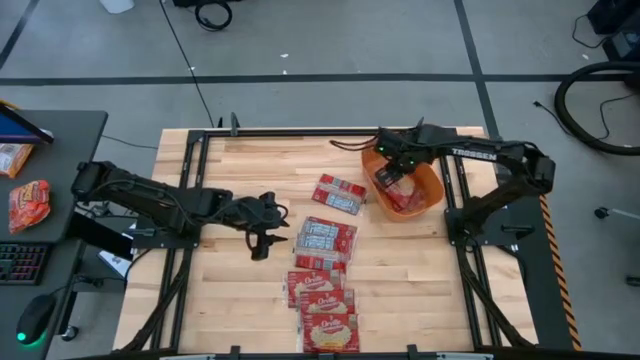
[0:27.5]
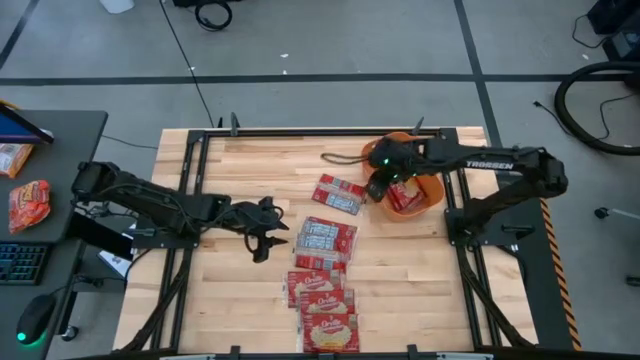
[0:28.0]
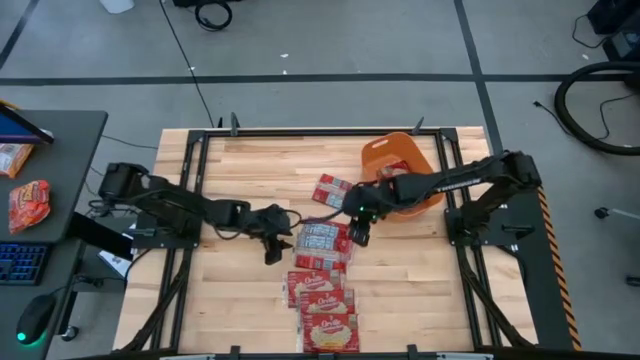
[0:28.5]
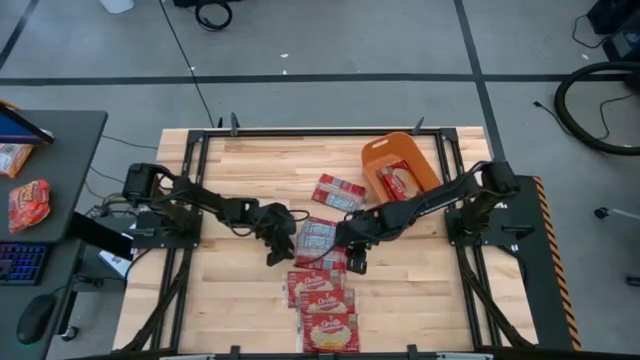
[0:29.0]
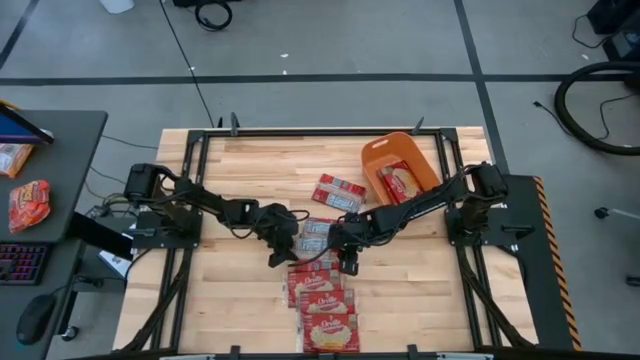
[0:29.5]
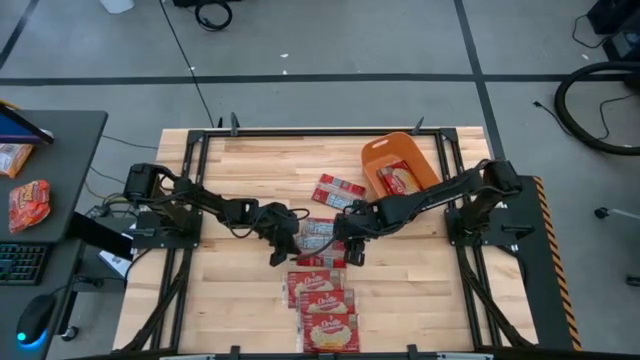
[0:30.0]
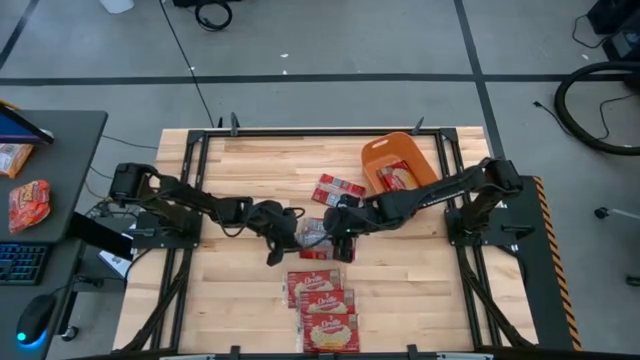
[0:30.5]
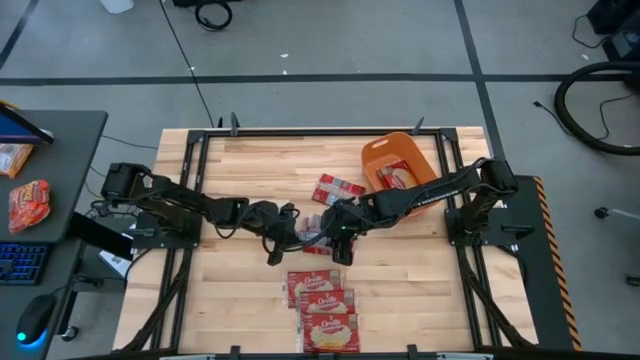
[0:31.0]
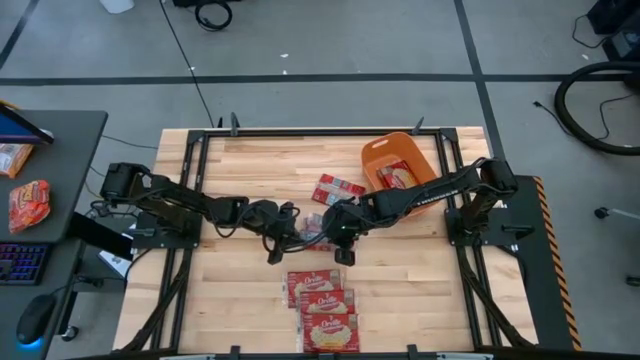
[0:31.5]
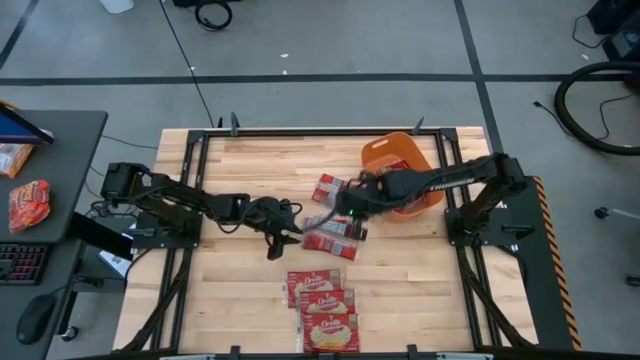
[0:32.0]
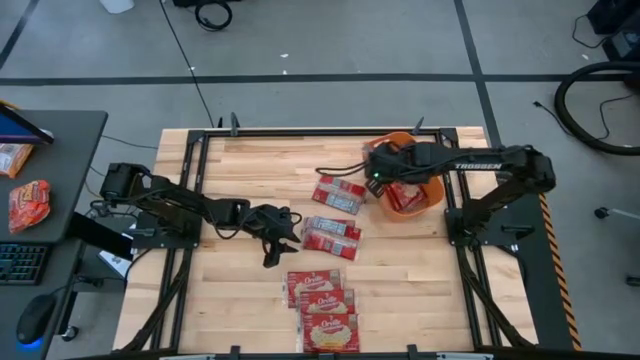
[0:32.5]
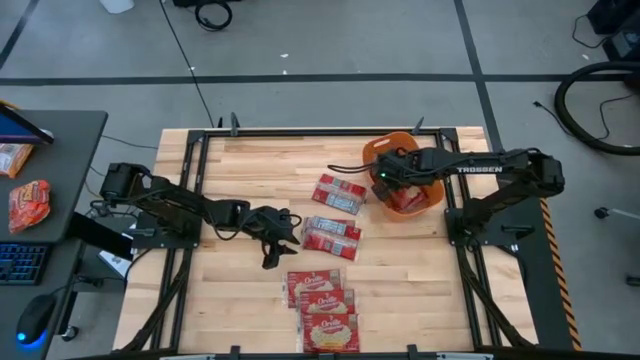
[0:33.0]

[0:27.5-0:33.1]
Task: Sort popcorn bags into baskets
Put the red popcorn bag into the orange bin

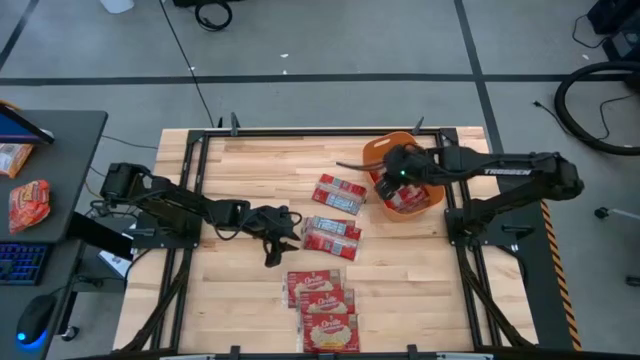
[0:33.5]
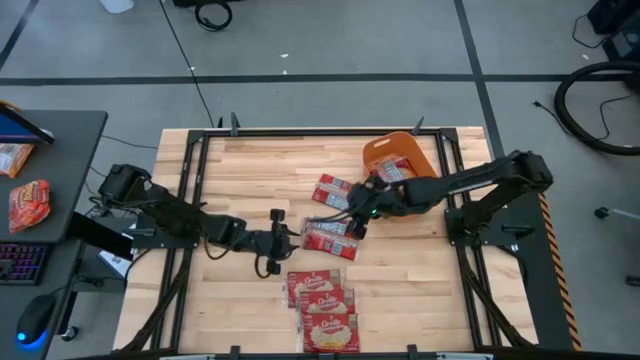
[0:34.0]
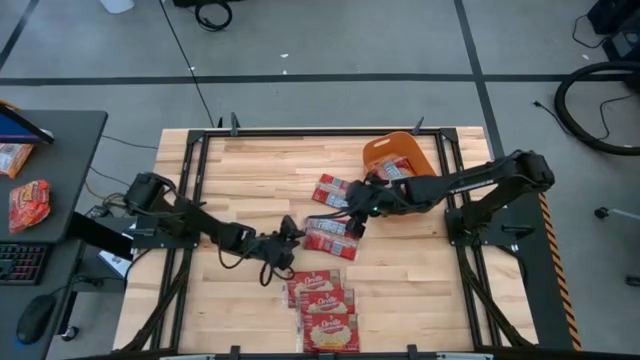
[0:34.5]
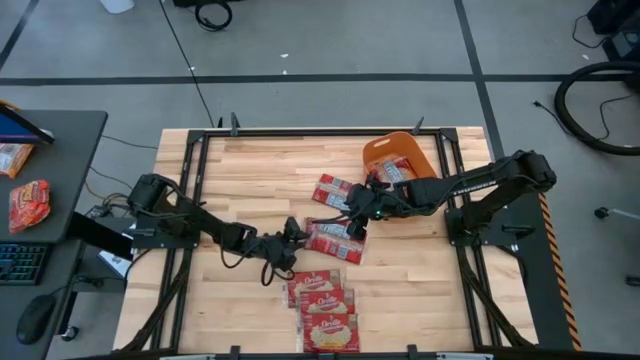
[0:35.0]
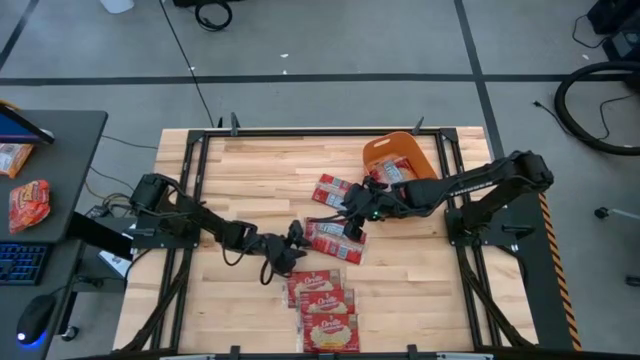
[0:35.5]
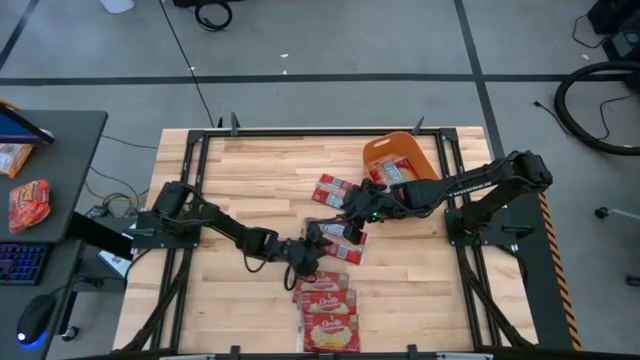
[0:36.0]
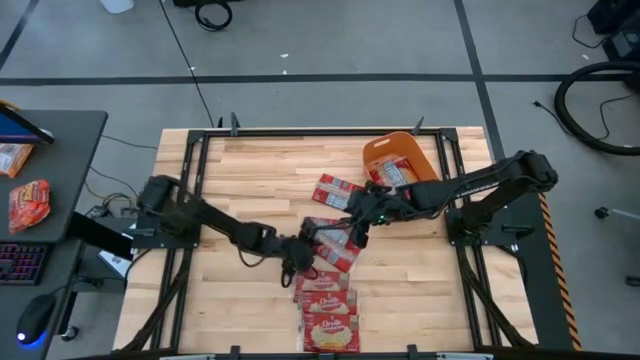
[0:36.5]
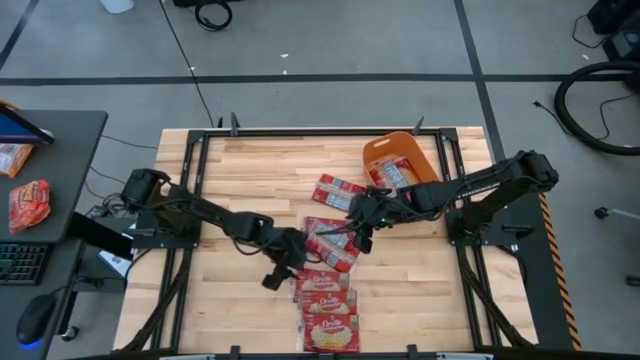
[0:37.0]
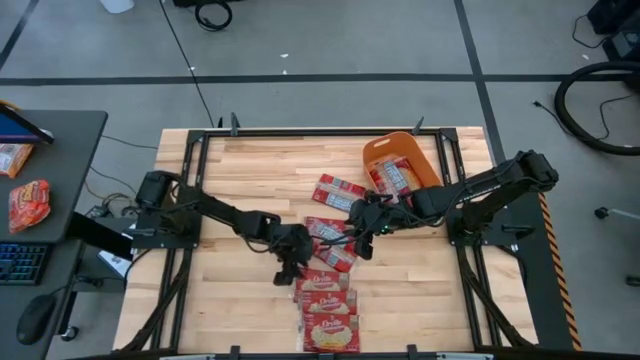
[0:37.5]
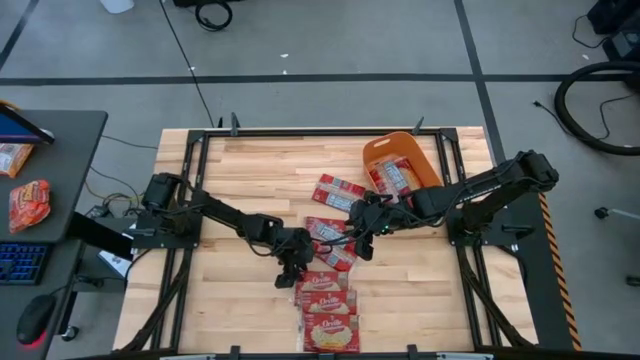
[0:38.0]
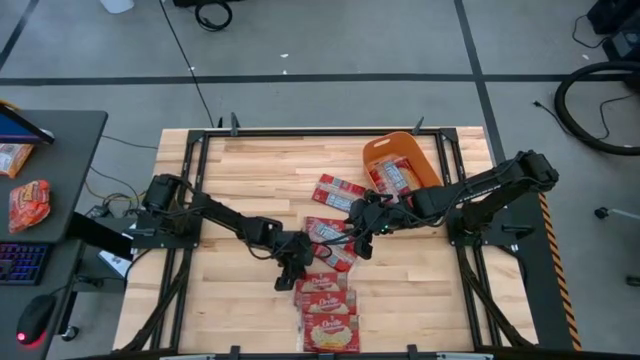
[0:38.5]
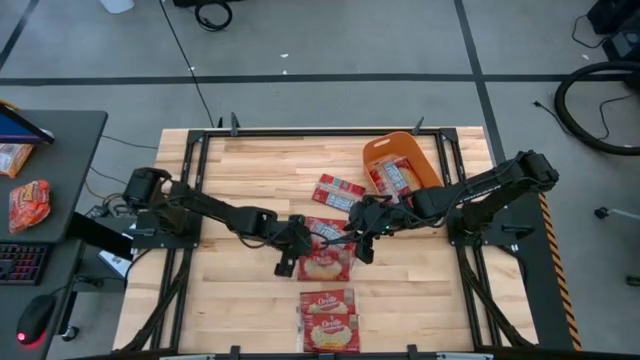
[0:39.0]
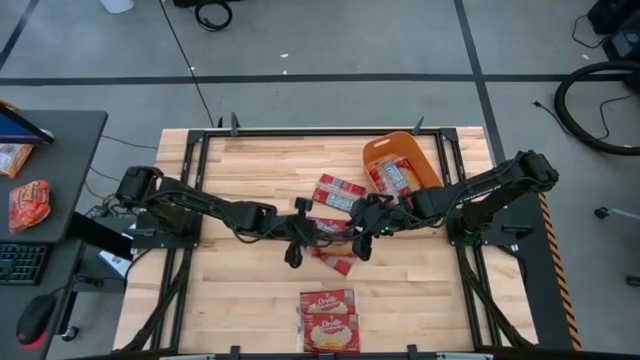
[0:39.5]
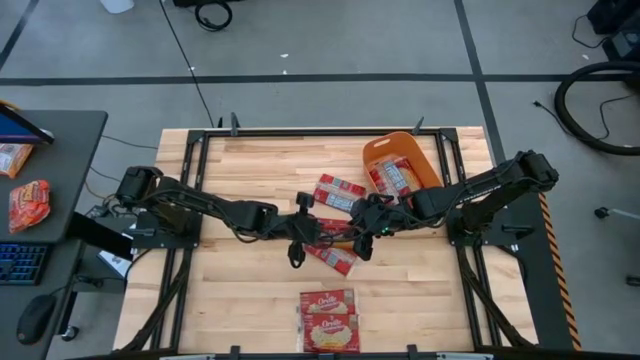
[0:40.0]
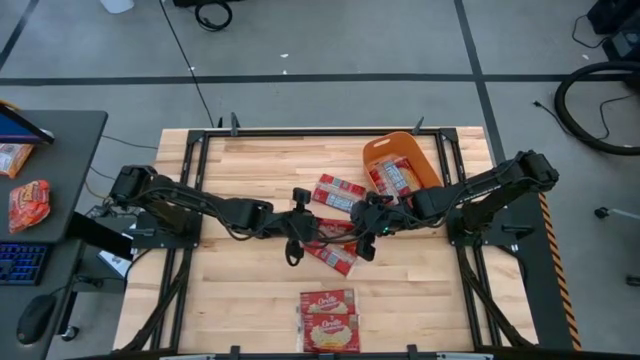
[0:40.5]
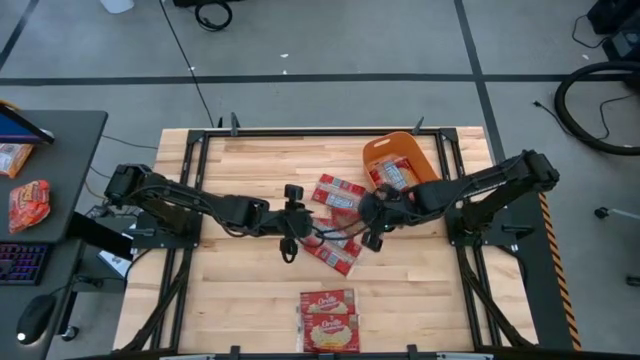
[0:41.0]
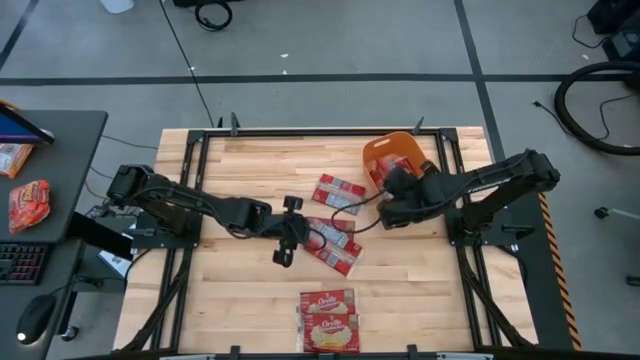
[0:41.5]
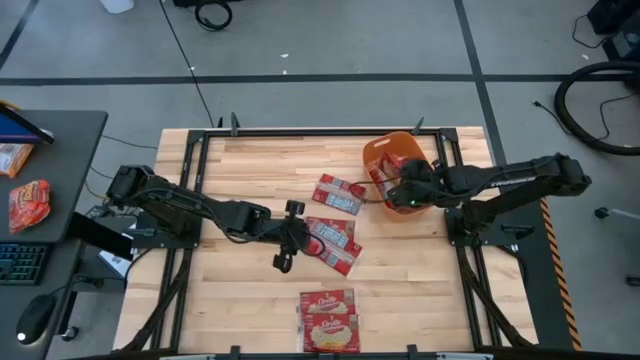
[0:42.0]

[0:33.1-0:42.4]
Put the red popcorn bag into the orange bin

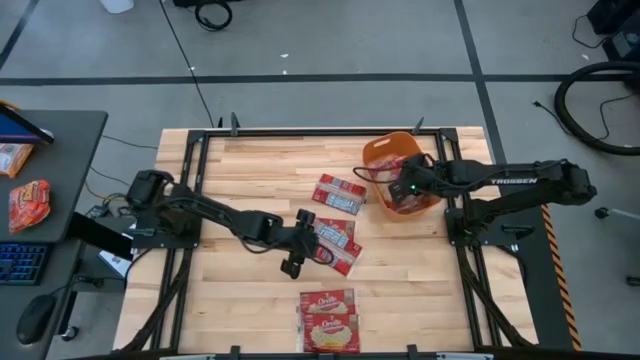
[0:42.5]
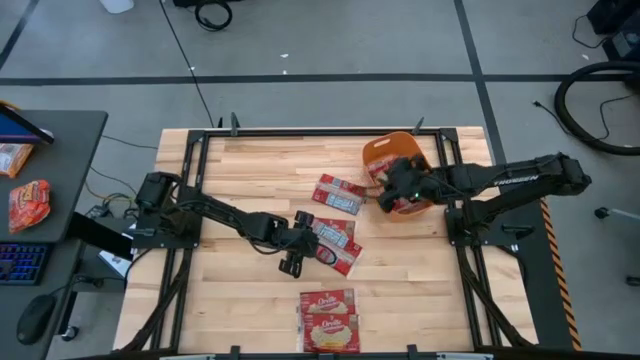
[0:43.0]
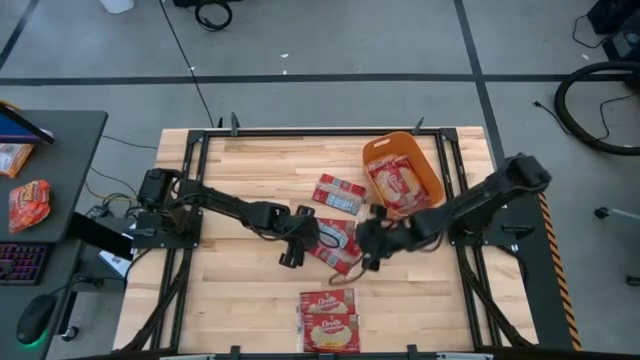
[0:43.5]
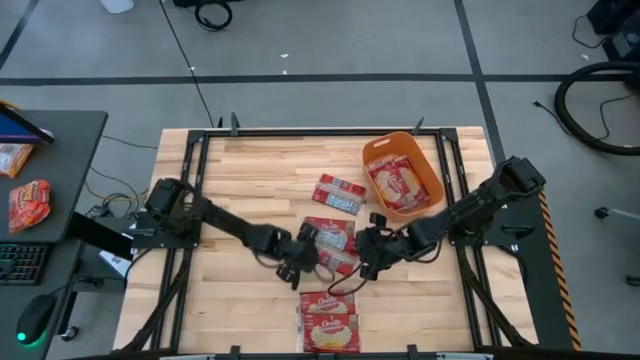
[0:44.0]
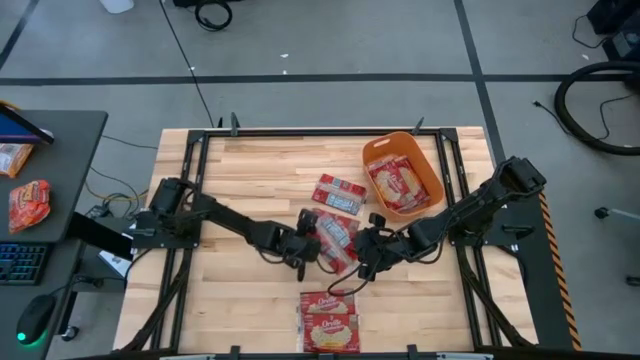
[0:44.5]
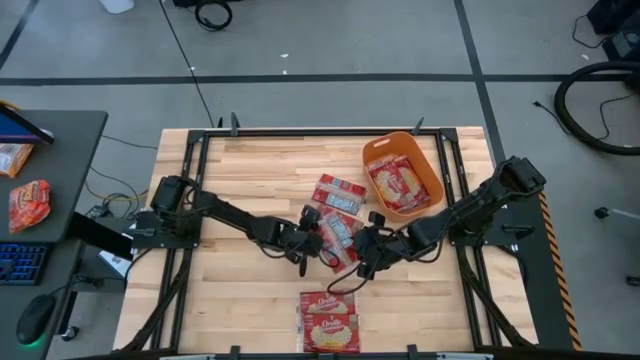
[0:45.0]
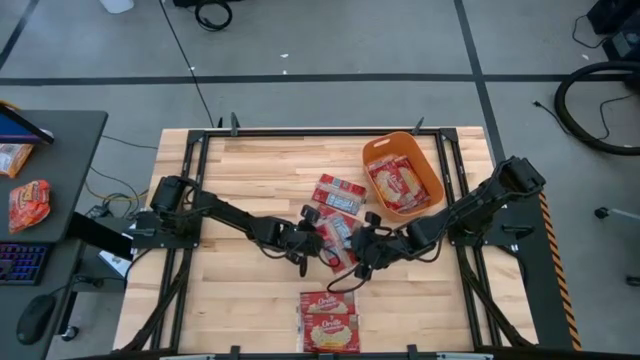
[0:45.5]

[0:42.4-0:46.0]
Put the red popcorn bag into the orange bin

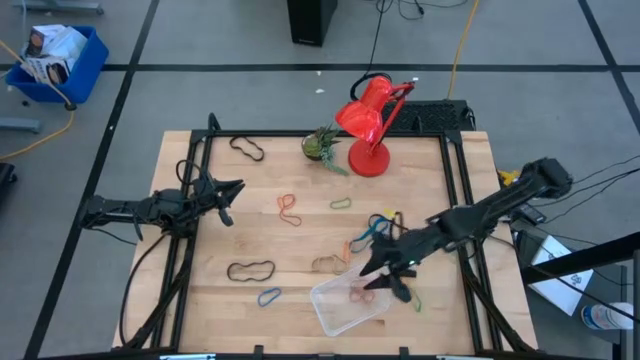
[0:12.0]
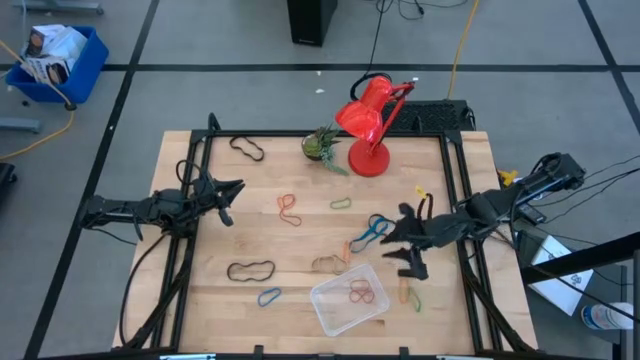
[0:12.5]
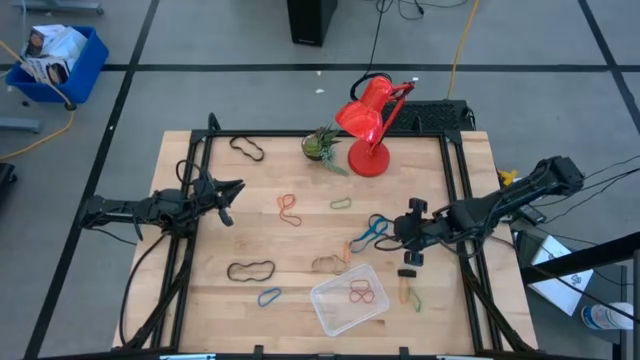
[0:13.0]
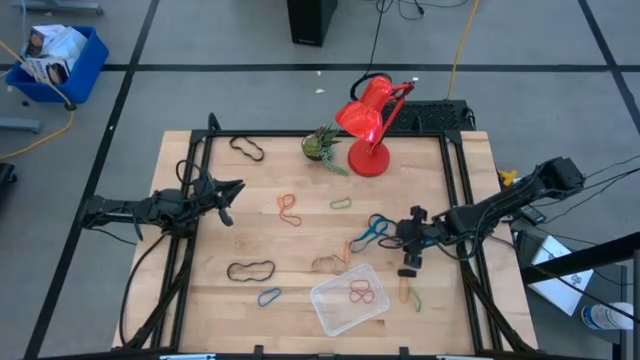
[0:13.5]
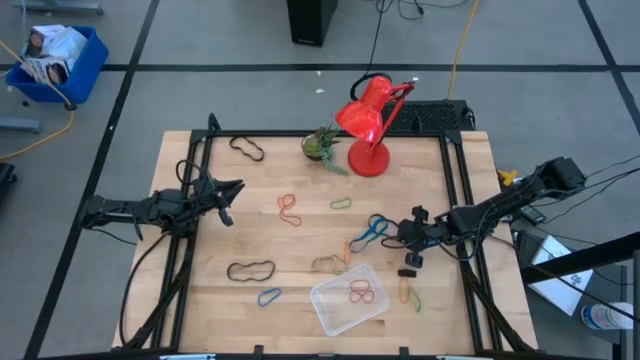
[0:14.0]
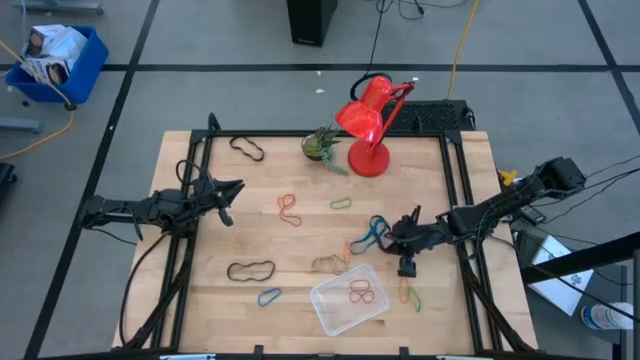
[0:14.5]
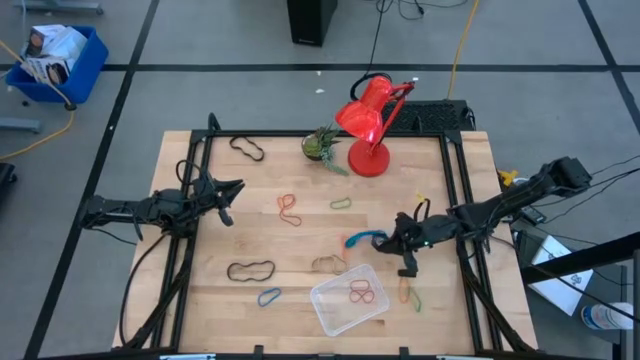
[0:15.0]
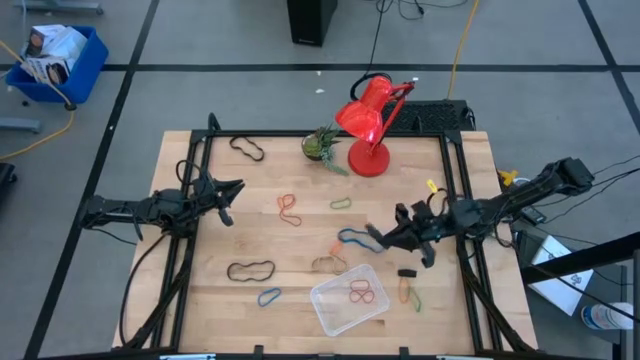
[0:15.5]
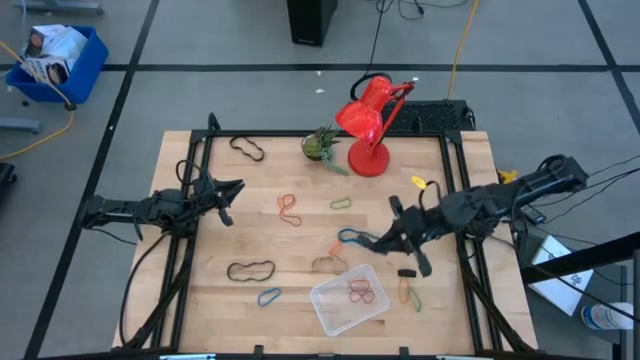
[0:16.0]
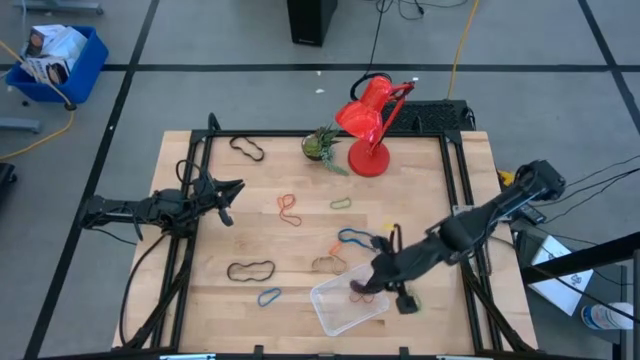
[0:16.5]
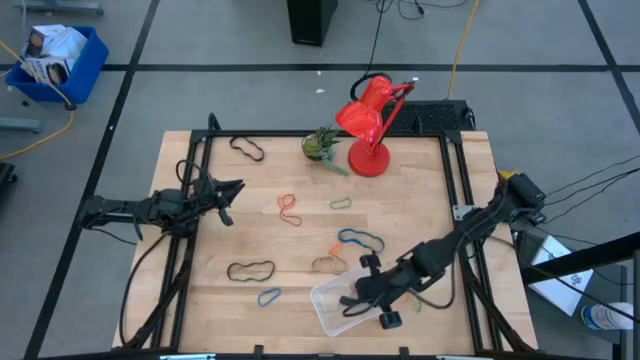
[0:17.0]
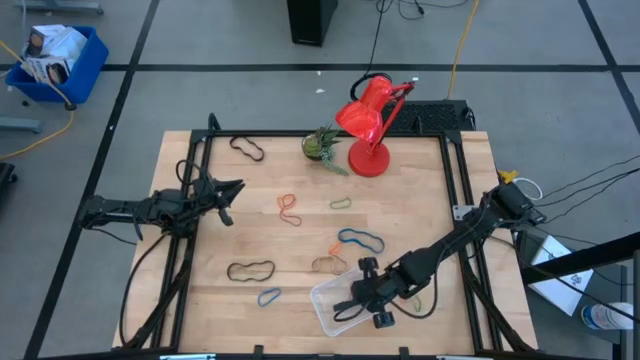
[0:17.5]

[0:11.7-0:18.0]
Task: Pick and place rubber bands into bin
Put the black rubber band into the transparent container
